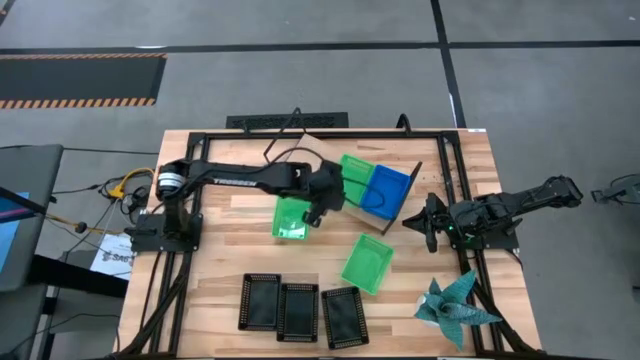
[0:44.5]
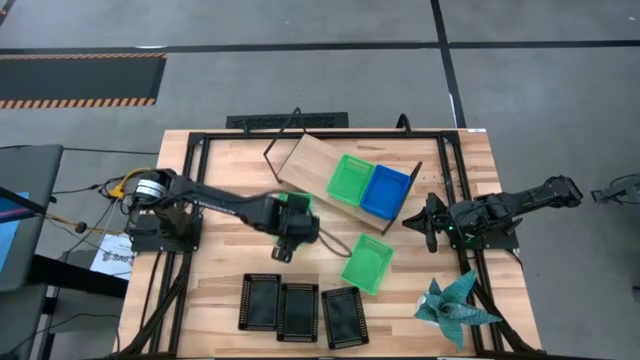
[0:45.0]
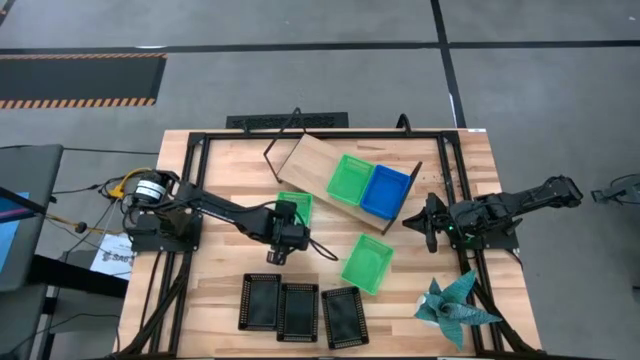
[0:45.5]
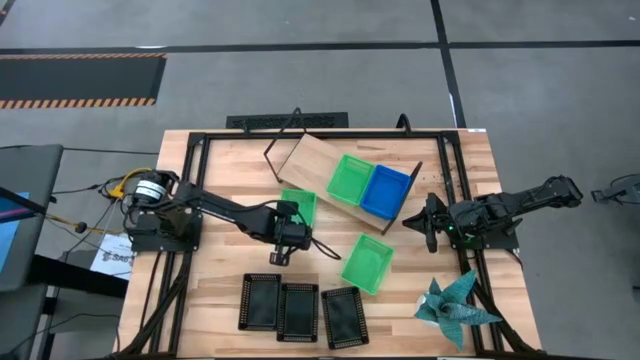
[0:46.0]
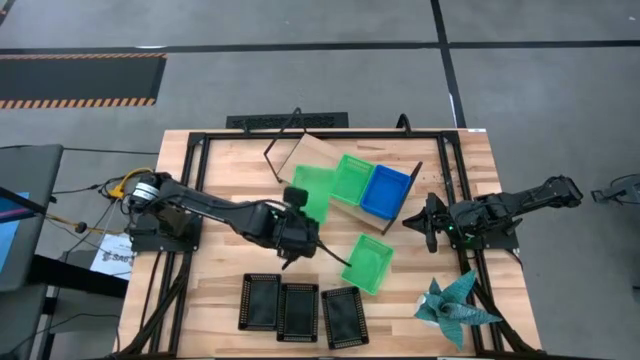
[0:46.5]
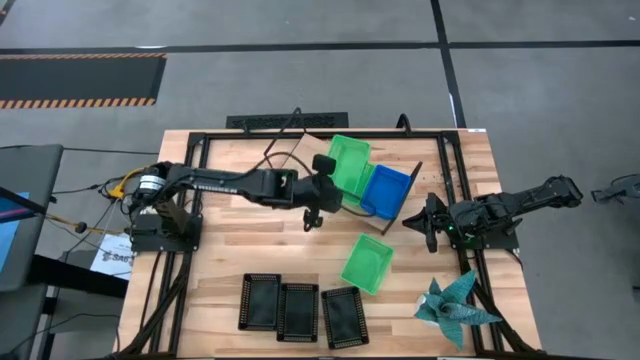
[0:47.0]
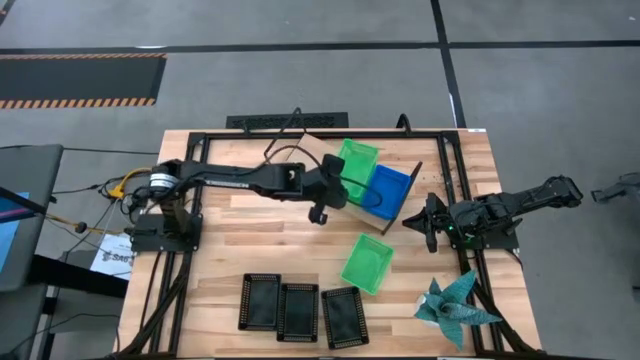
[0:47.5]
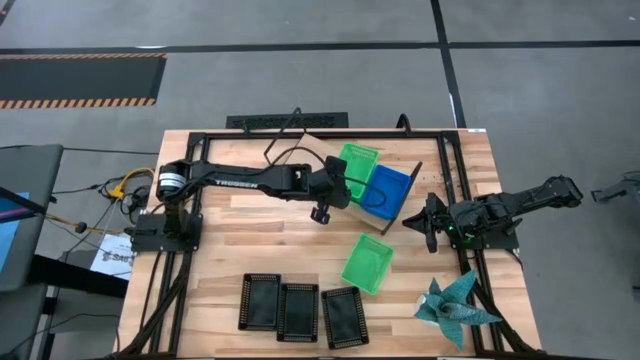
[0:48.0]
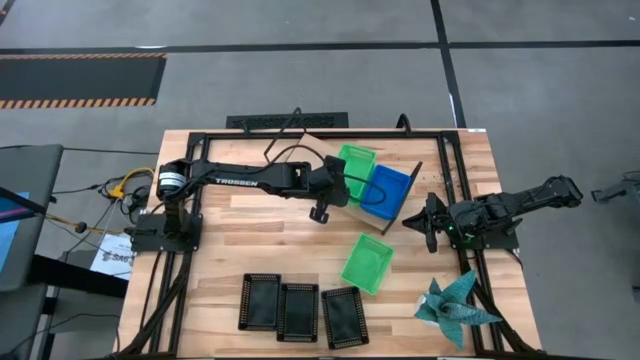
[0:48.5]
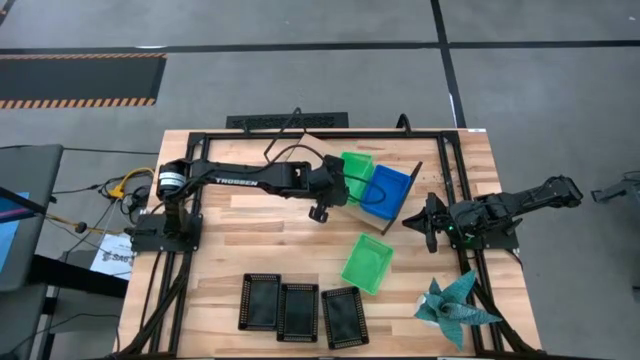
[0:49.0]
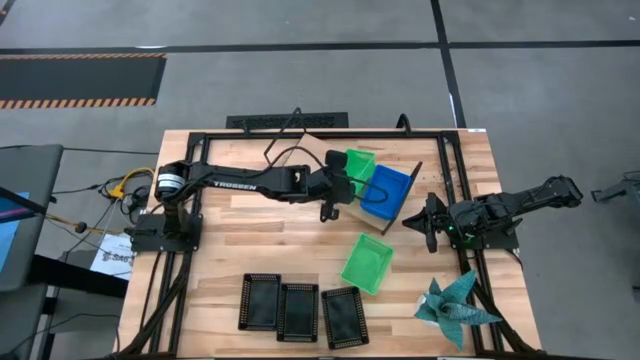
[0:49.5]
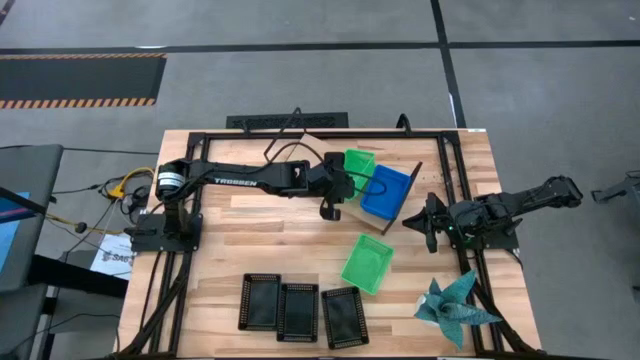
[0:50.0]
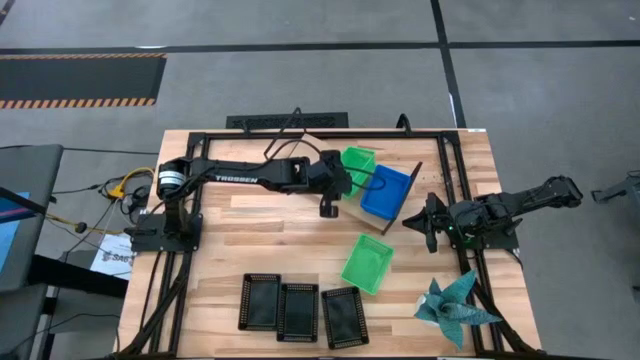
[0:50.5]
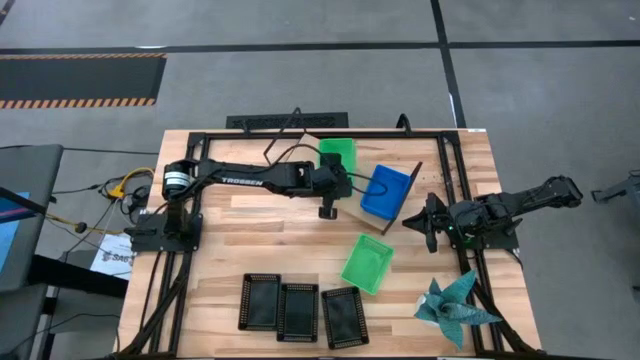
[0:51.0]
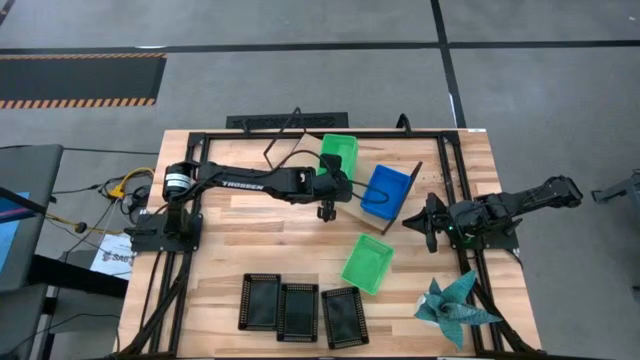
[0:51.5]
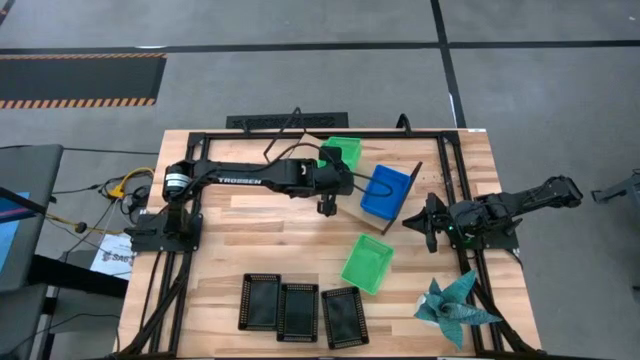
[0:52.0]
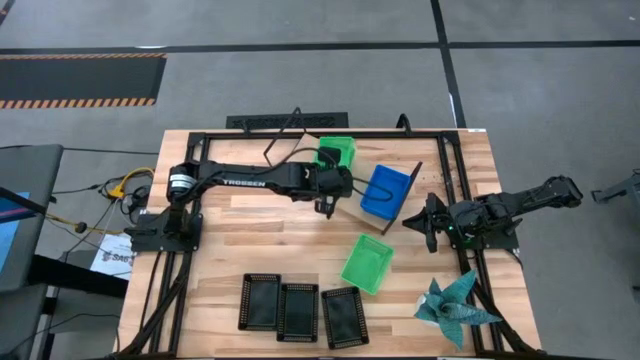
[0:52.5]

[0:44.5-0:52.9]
Task: Stack baskets on shelf by color
Stack the left green bin on the green bin on the shelf

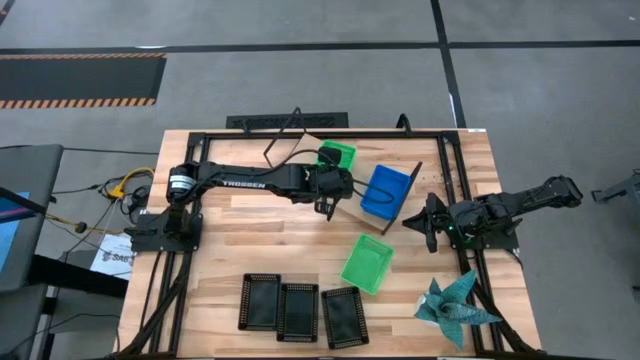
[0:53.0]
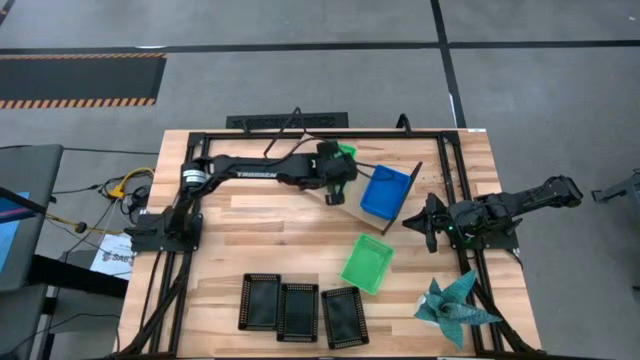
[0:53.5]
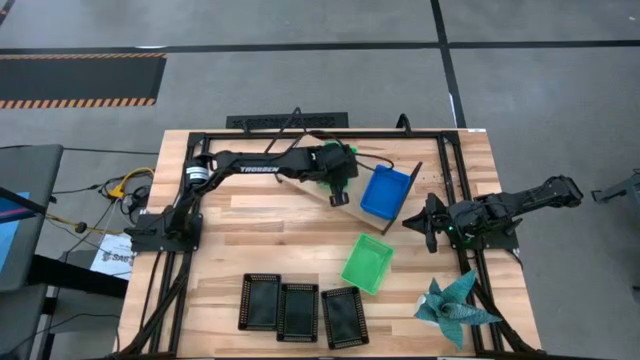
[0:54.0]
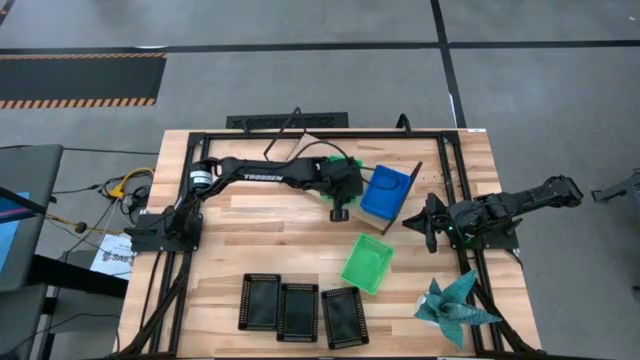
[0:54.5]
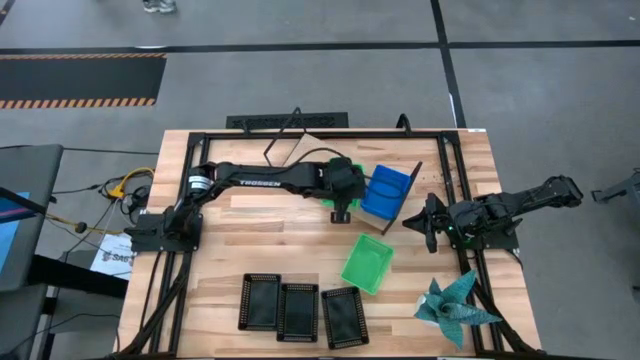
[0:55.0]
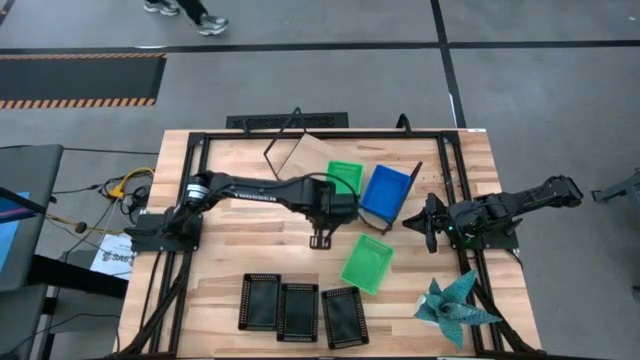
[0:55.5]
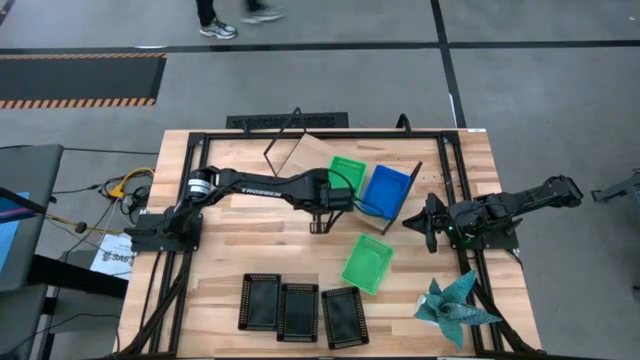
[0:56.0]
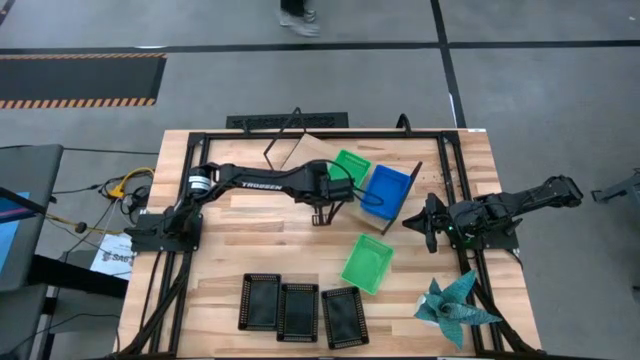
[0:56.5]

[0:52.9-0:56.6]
Adjust the green bins on the shelf

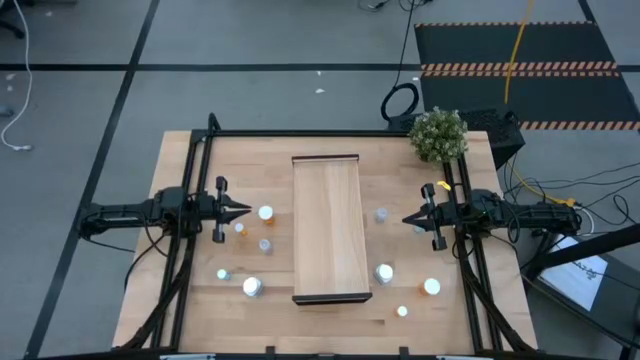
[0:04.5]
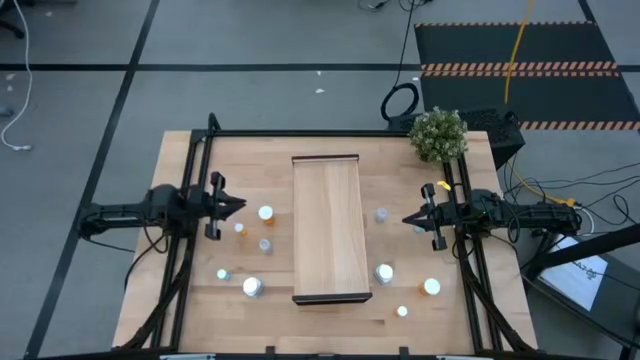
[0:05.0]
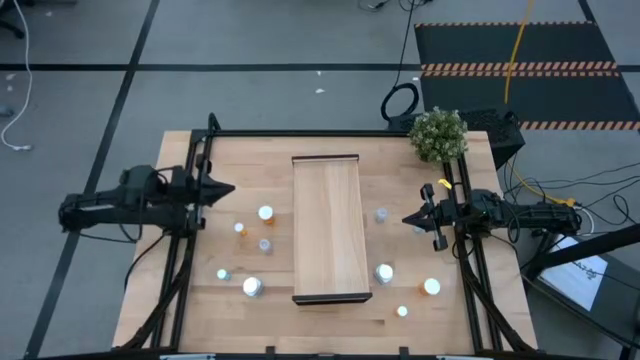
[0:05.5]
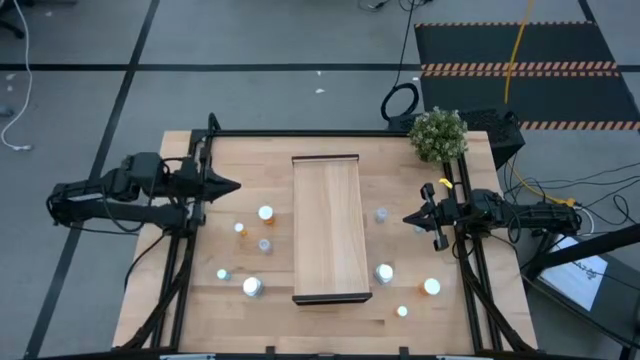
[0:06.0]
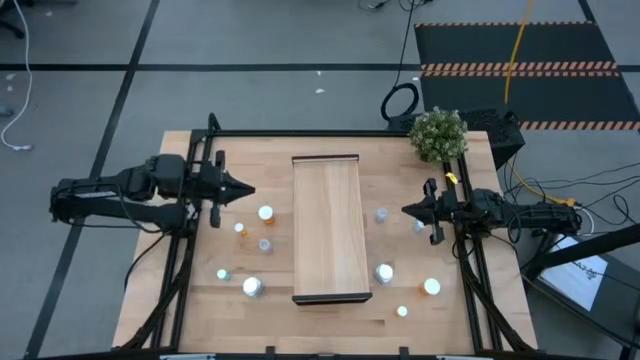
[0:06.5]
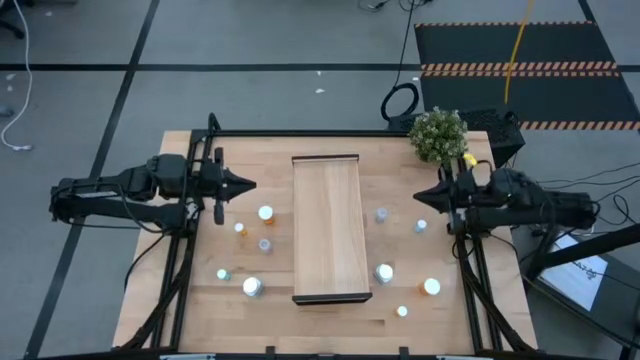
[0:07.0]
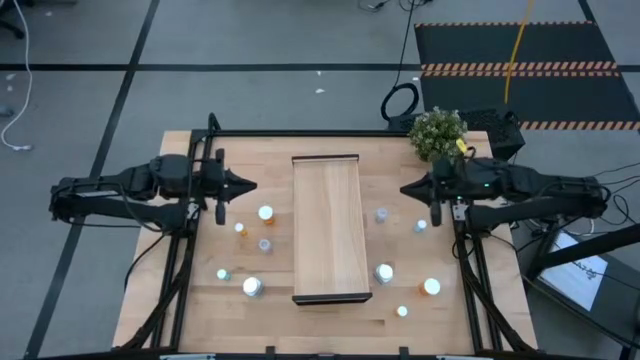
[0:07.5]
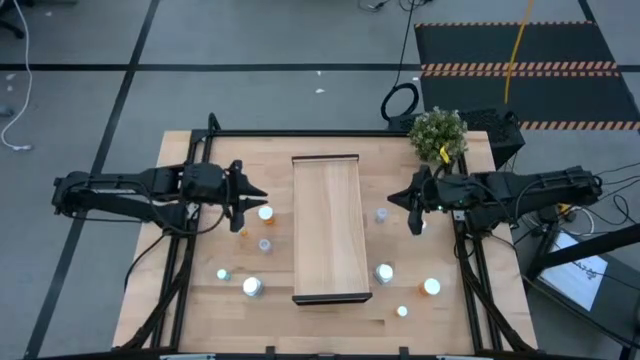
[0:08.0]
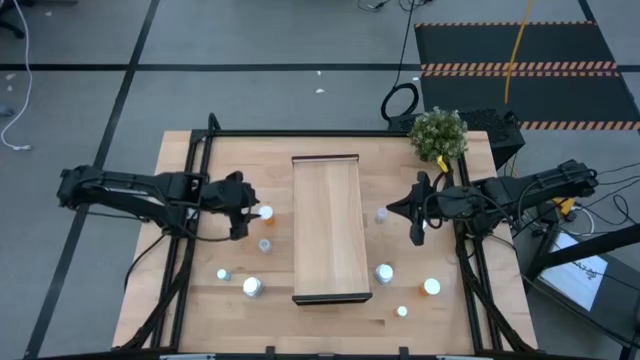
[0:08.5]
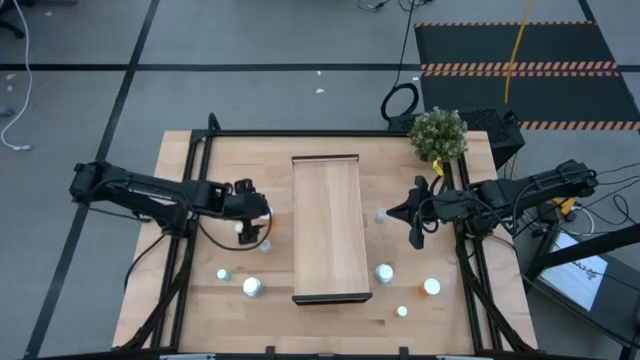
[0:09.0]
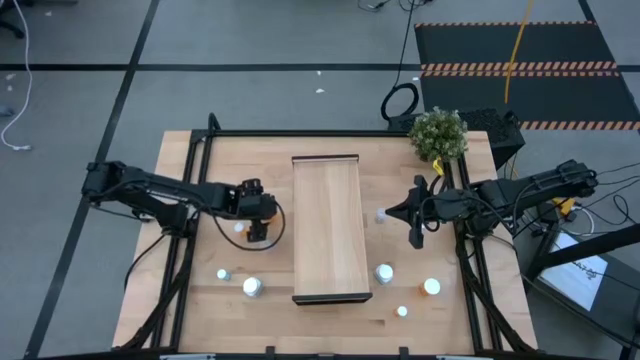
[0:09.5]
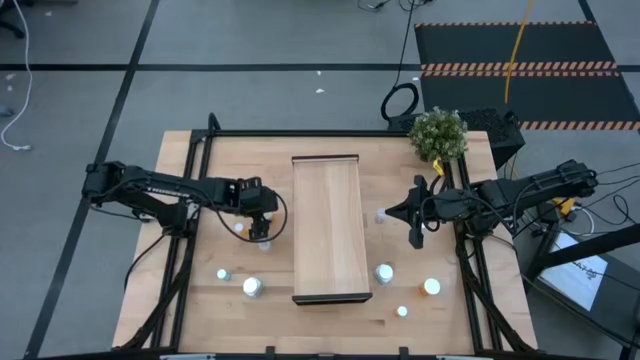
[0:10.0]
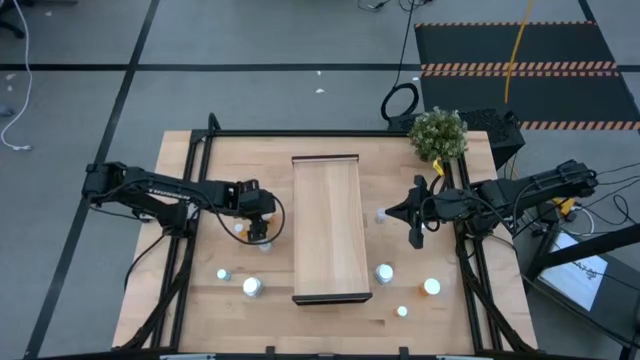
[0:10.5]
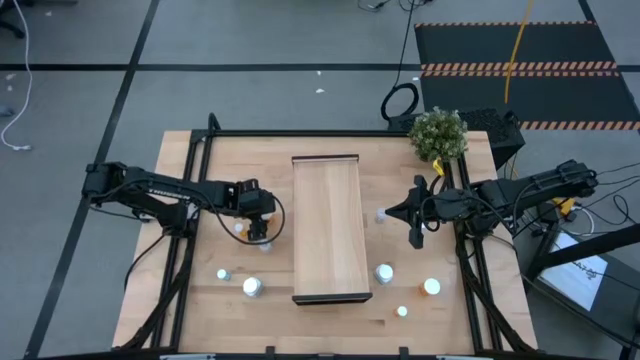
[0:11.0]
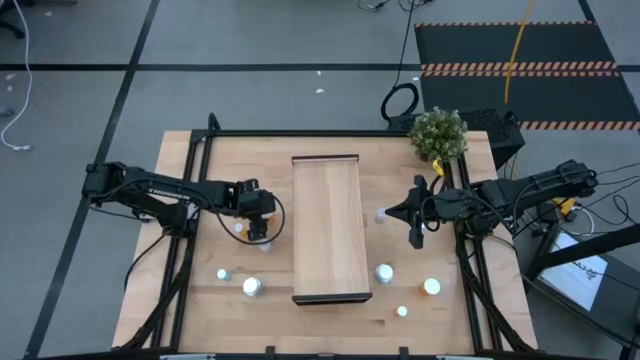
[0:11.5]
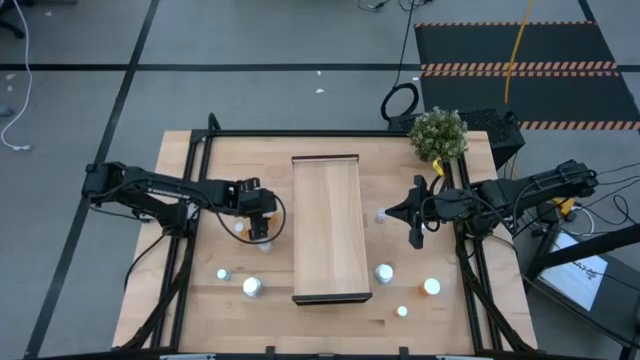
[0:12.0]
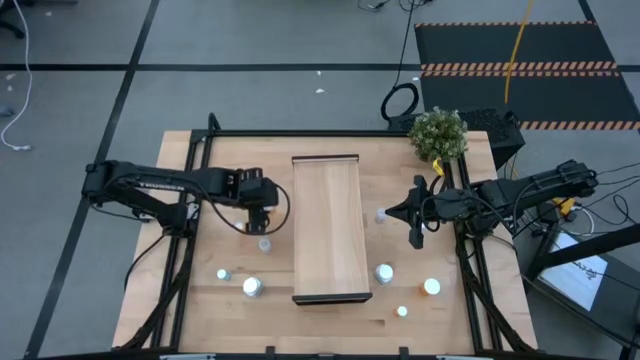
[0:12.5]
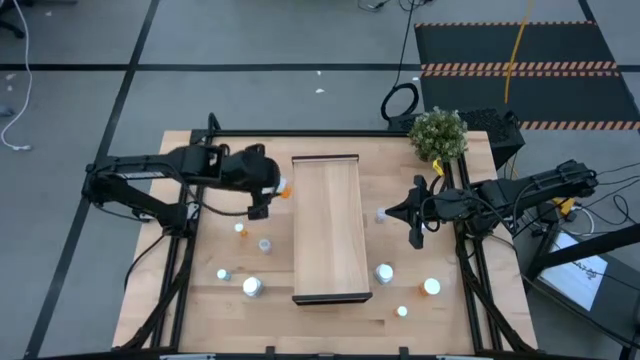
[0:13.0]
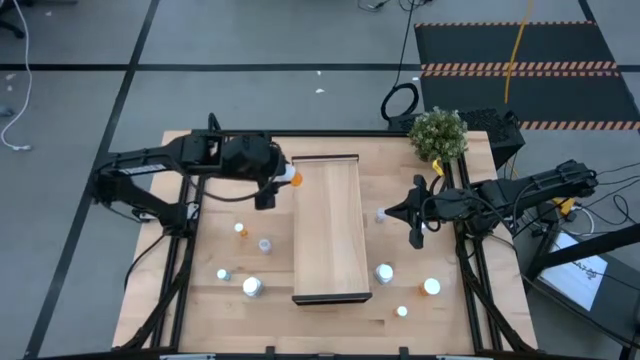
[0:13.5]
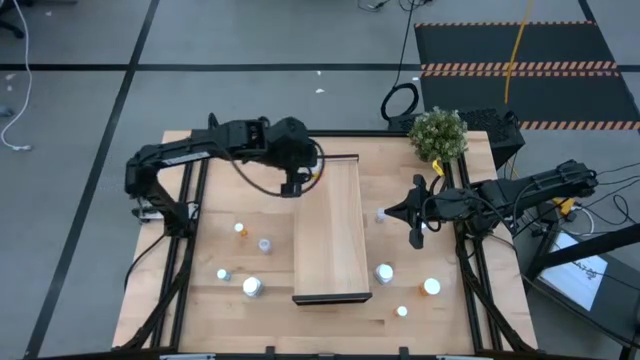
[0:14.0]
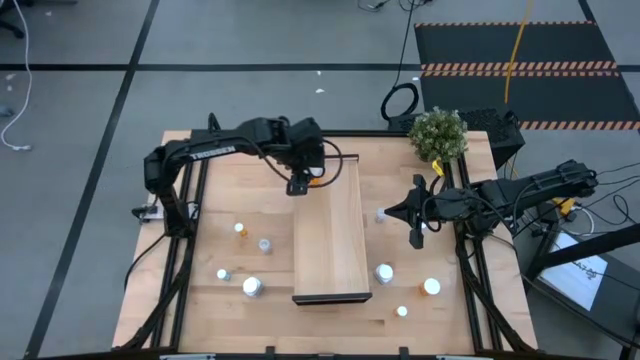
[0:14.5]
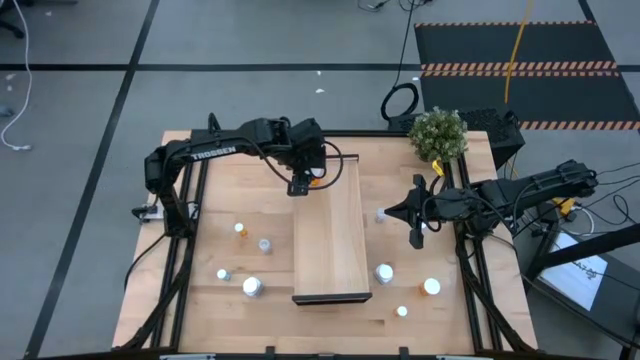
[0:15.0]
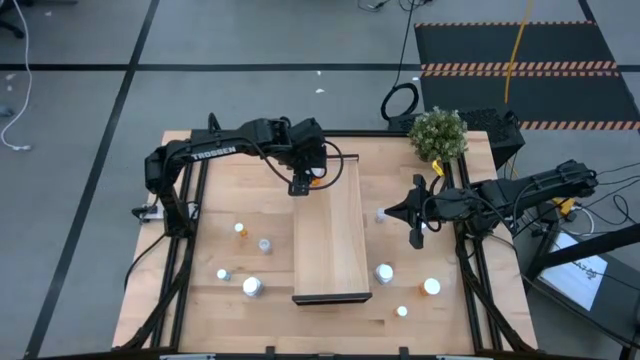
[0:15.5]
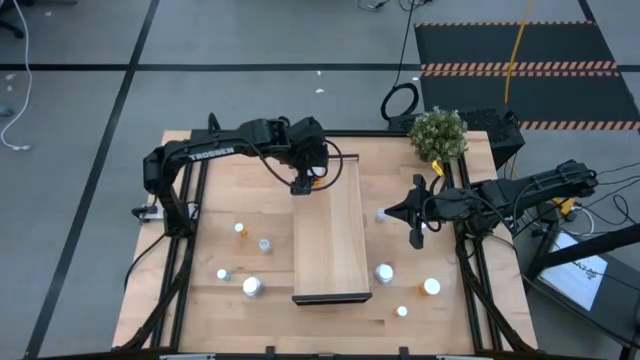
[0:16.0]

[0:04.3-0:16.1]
Task: Pick and place medicine bottles onto shelf by color
Put the top large orange pill bottle on the shelf
